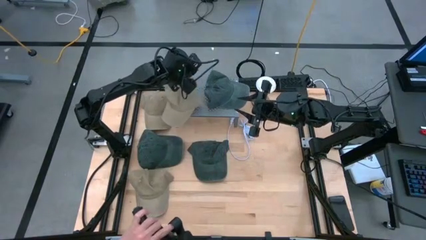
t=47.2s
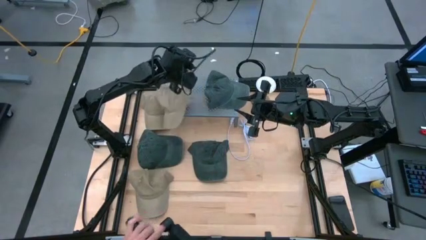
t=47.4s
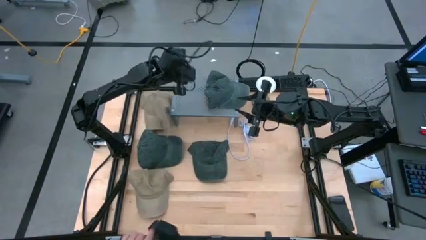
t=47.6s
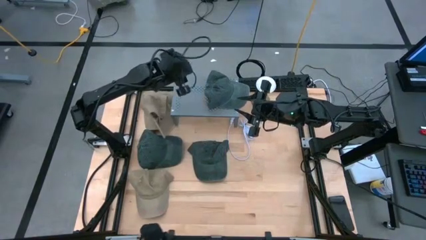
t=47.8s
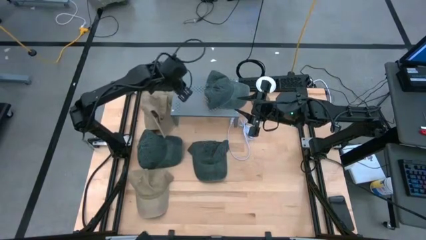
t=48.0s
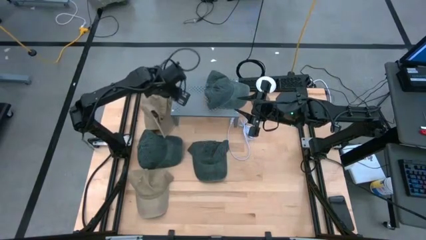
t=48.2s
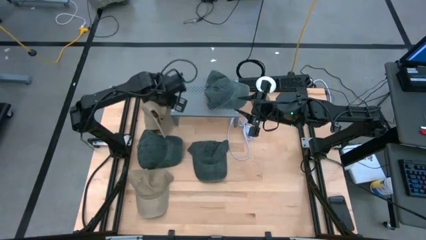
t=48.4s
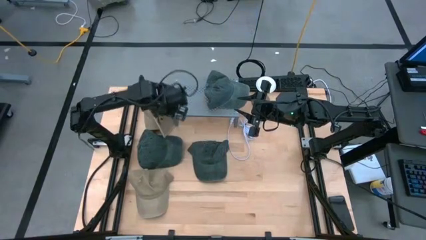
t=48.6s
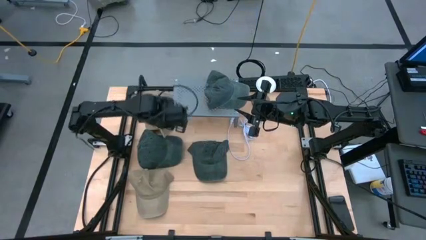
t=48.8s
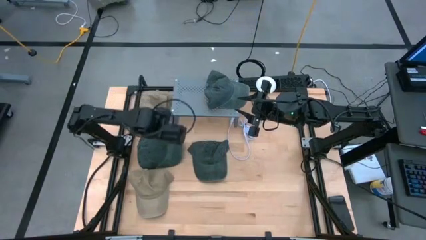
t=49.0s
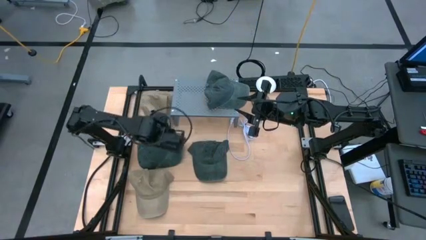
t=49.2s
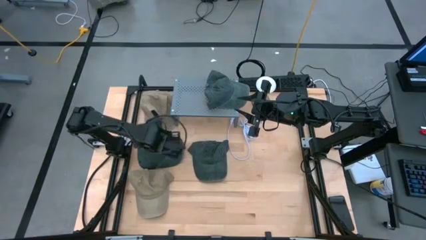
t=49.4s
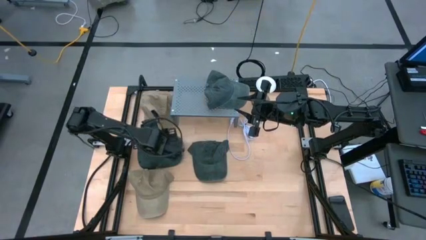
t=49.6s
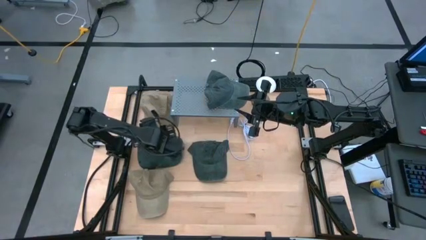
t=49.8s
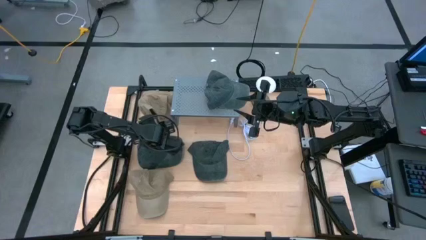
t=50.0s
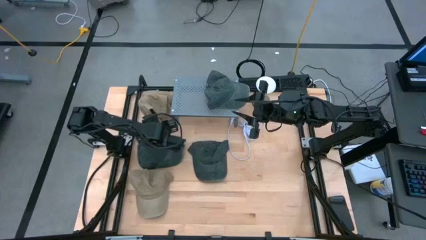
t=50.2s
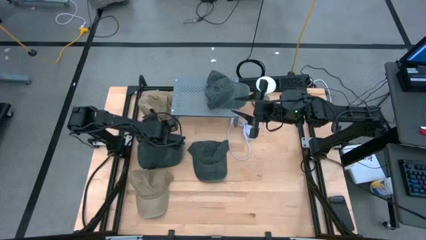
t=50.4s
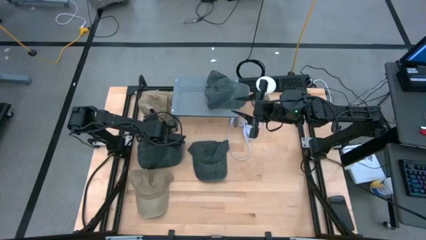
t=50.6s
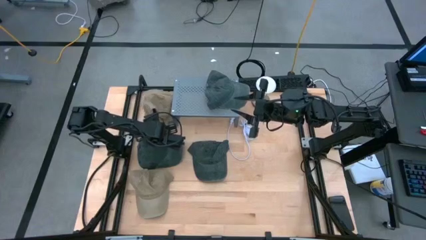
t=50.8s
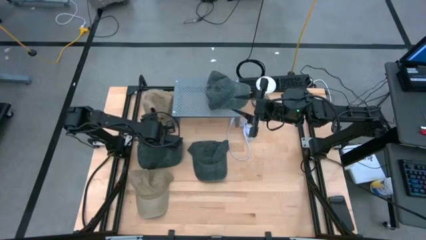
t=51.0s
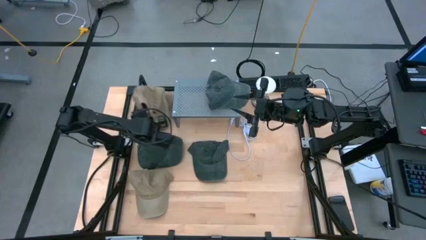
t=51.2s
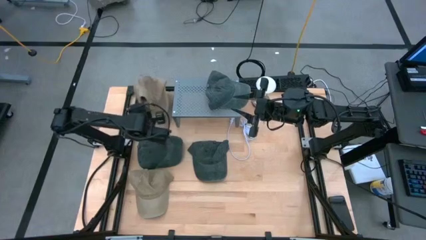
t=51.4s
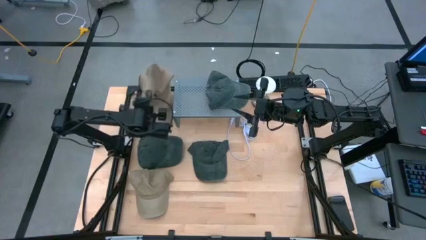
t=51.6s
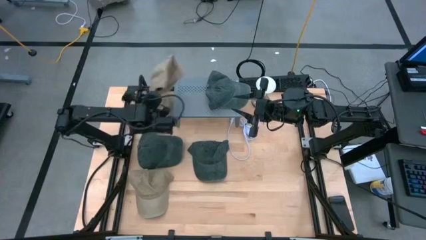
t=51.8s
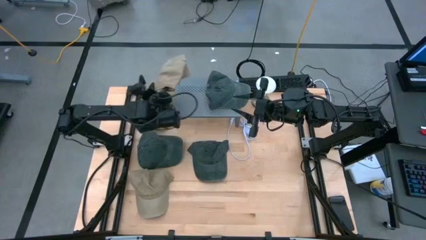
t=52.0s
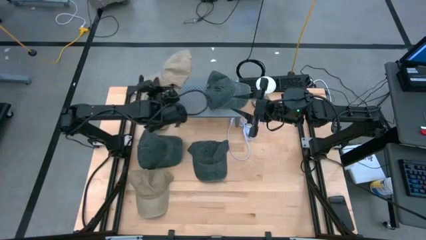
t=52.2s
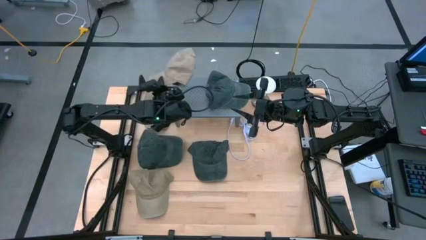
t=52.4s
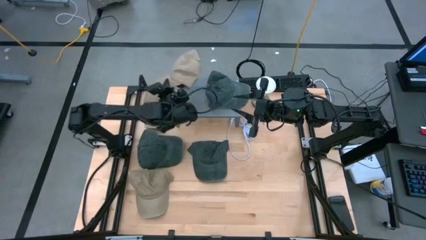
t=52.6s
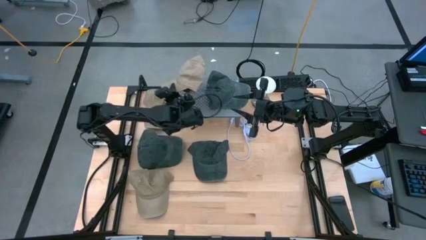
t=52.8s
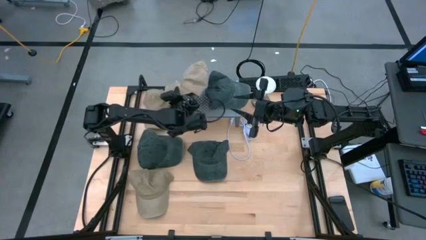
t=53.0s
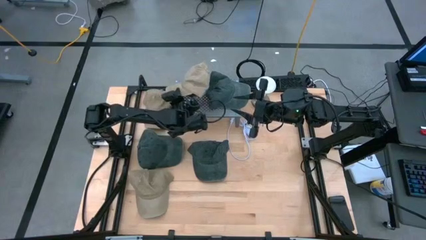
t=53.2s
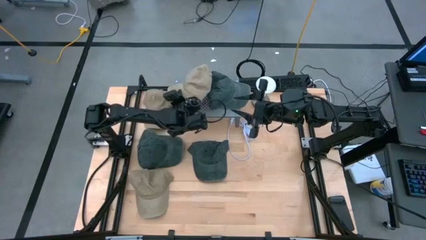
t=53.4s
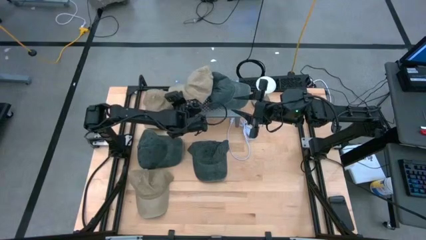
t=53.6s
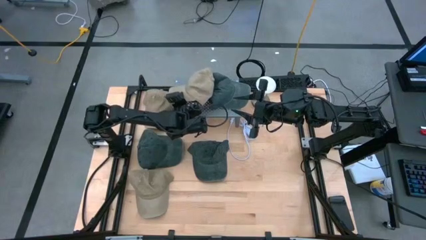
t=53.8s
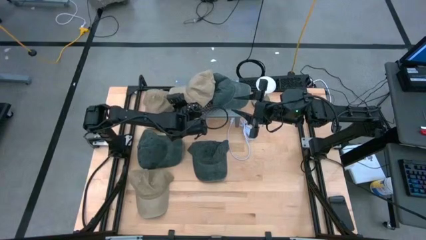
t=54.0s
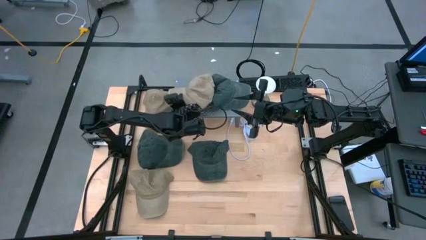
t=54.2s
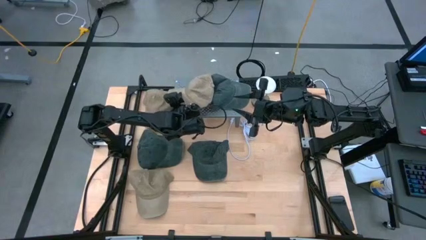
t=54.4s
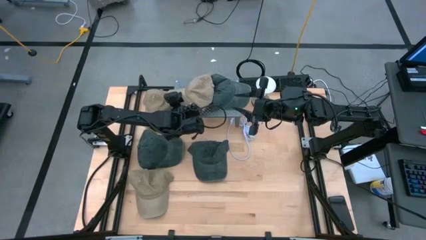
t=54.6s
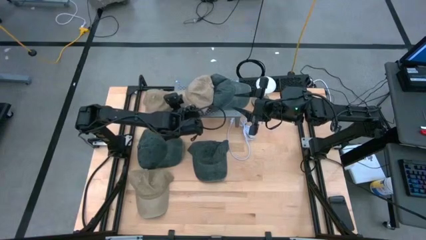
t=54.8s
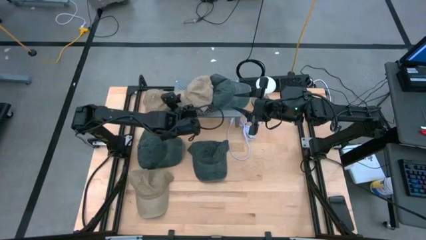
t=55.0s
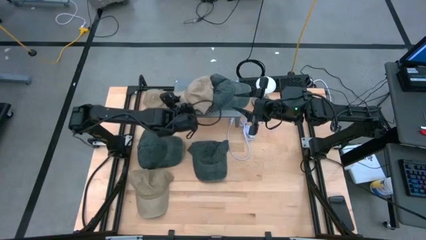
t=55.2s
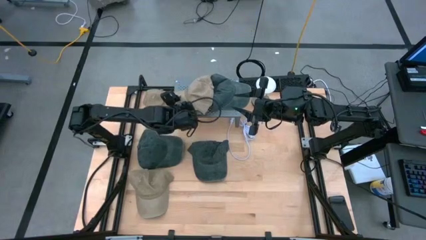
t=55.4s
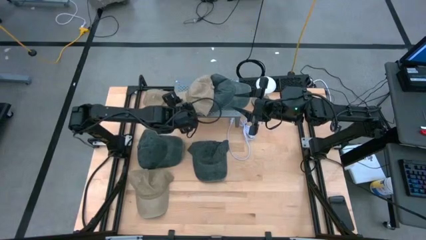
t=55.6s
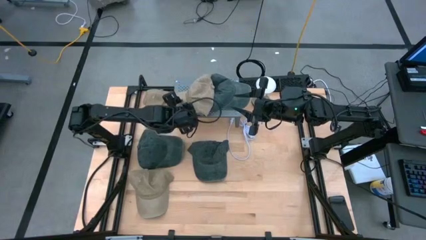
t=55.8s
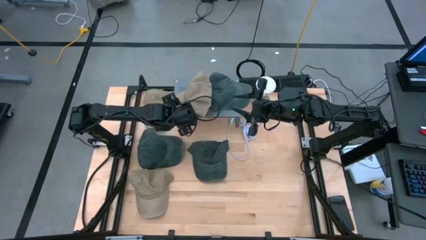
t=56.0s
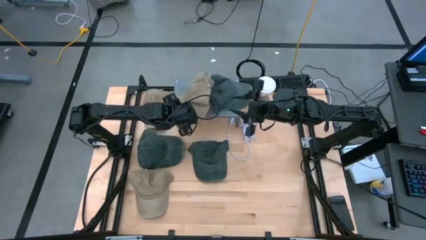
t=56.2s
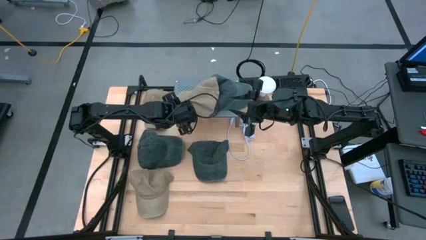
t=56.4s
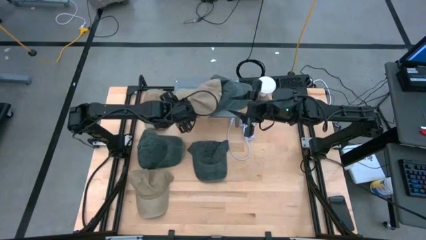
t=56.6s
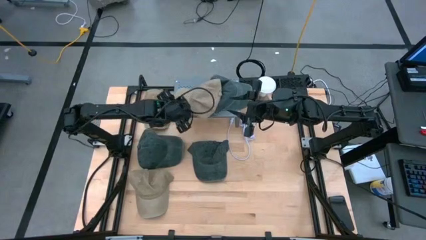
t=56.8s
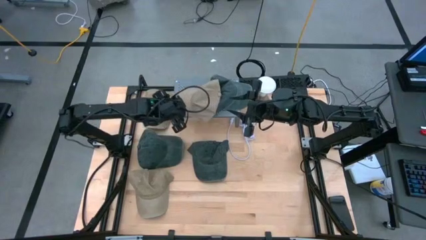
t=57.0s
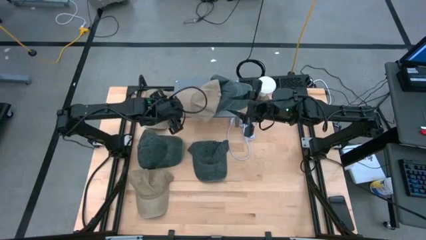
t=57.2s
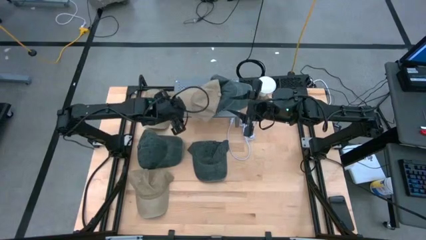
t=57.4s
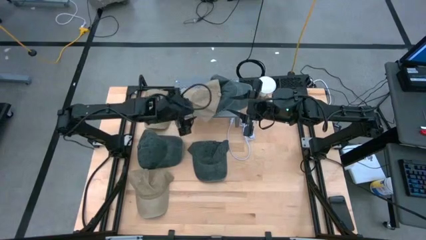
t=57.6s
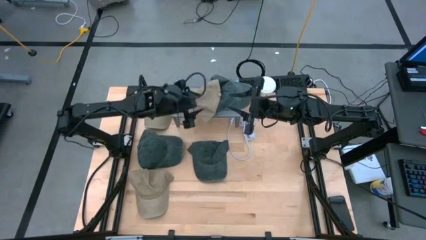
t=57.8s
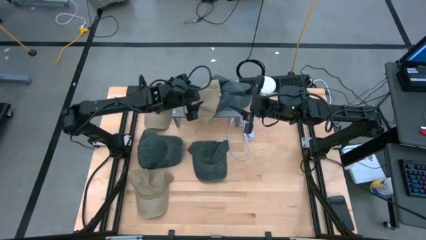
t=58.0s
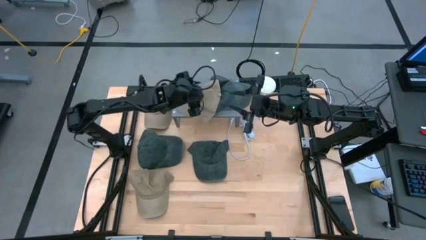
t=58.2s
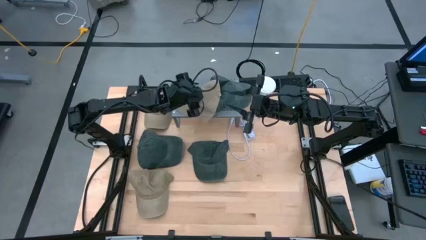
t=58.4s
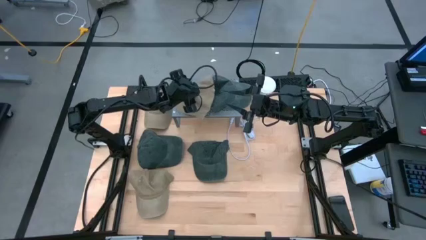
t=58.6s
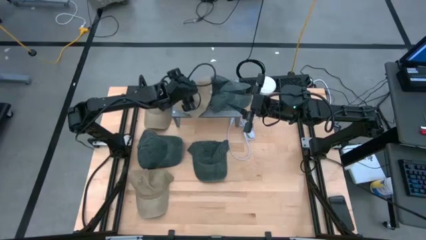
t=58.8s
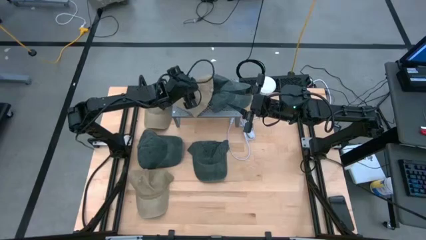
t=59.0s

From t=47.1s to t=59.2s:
Task: Pick & Place hat
Put the right brown cap on the shelf
